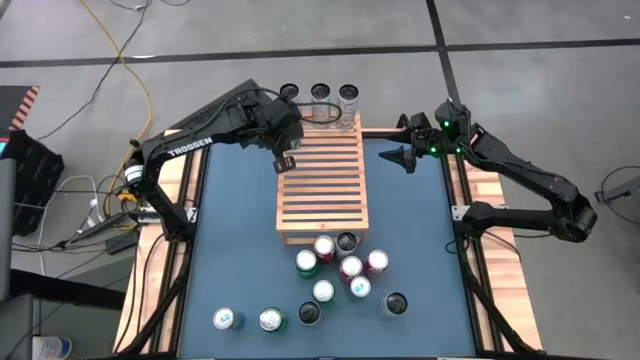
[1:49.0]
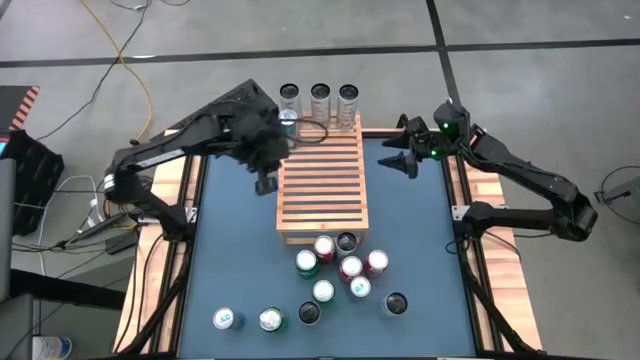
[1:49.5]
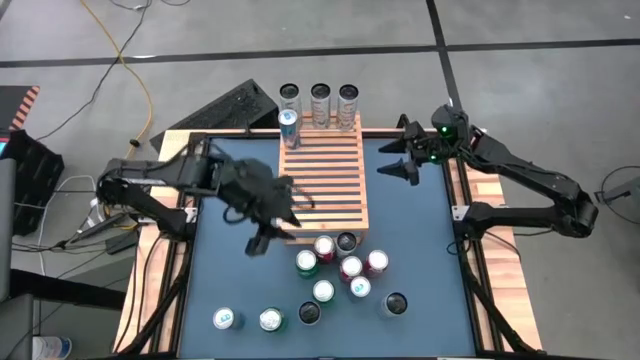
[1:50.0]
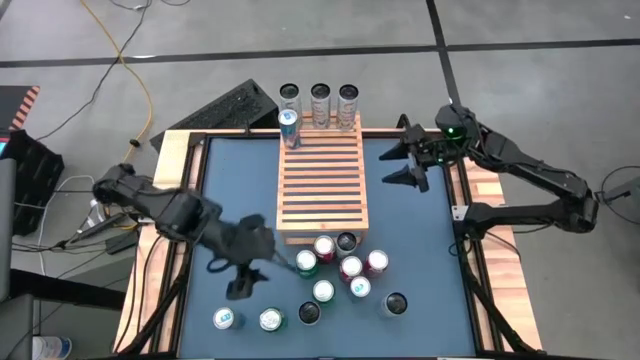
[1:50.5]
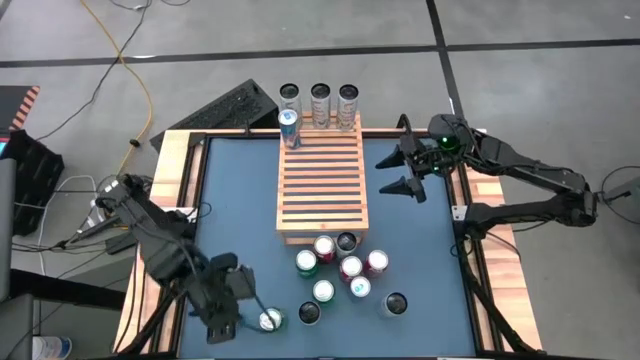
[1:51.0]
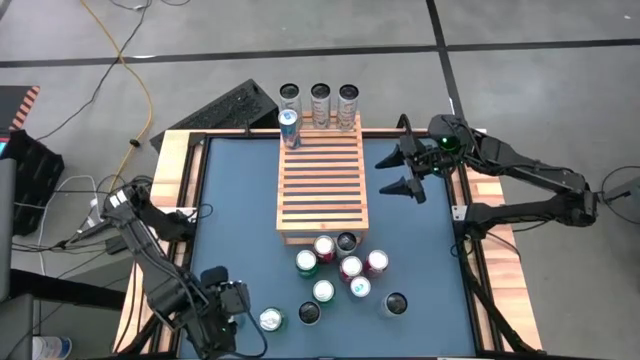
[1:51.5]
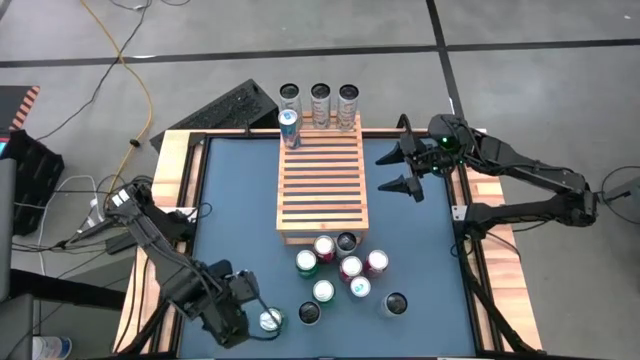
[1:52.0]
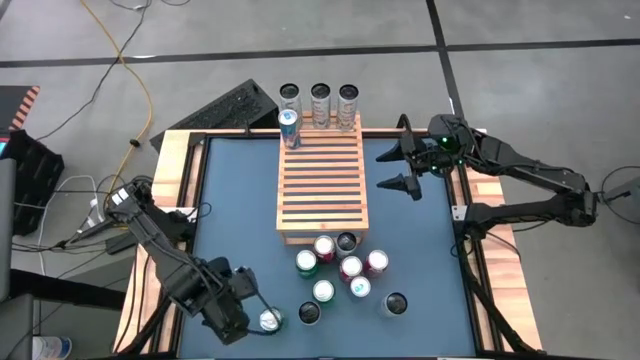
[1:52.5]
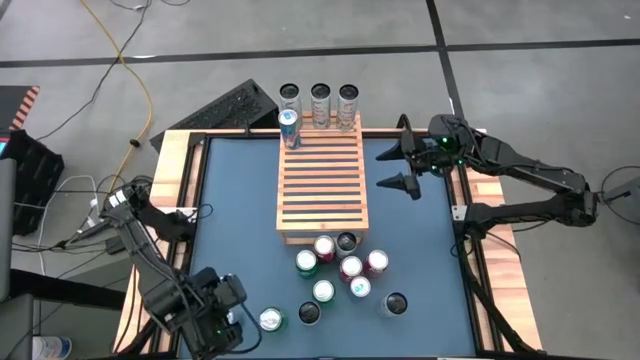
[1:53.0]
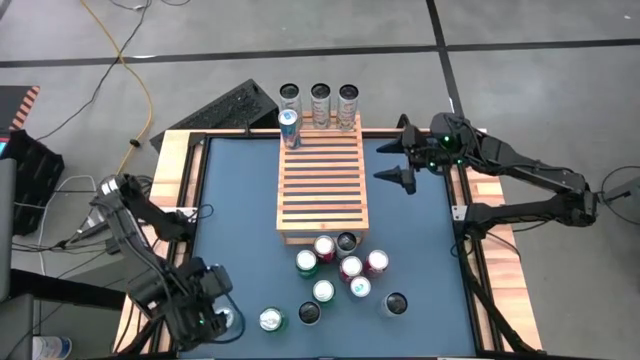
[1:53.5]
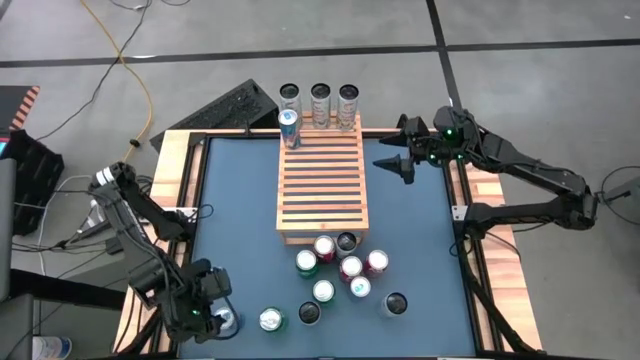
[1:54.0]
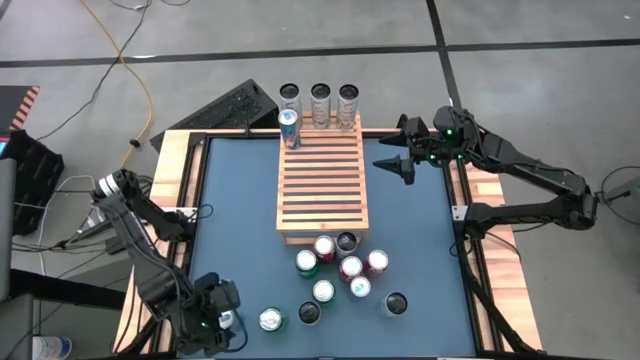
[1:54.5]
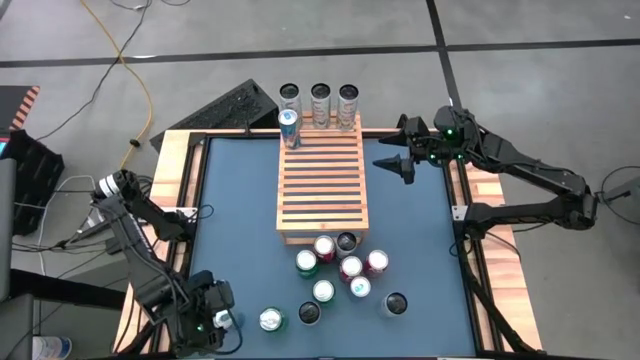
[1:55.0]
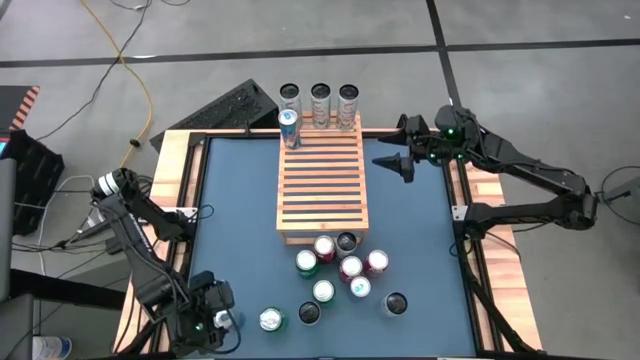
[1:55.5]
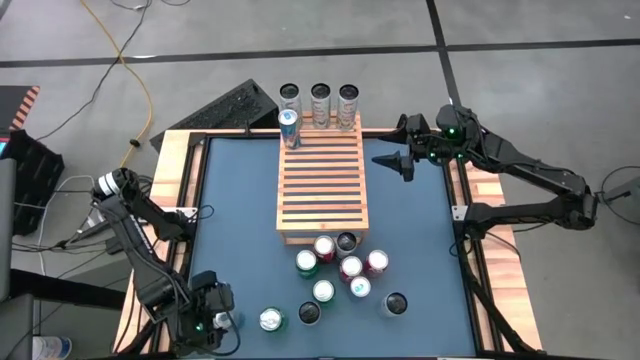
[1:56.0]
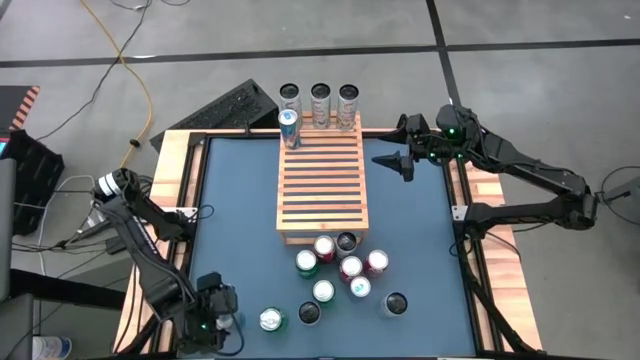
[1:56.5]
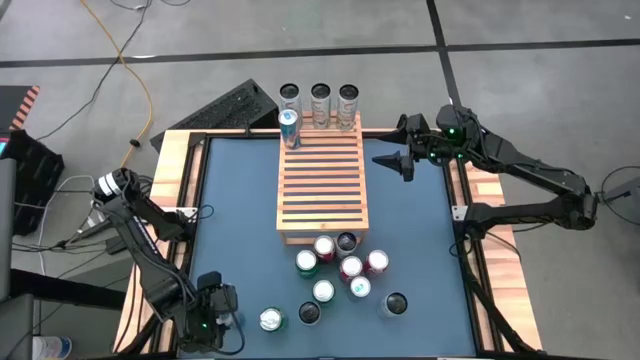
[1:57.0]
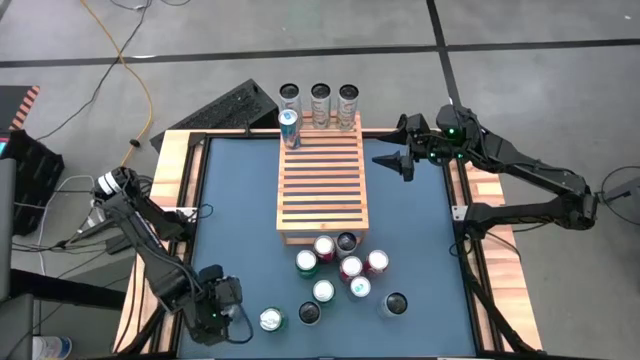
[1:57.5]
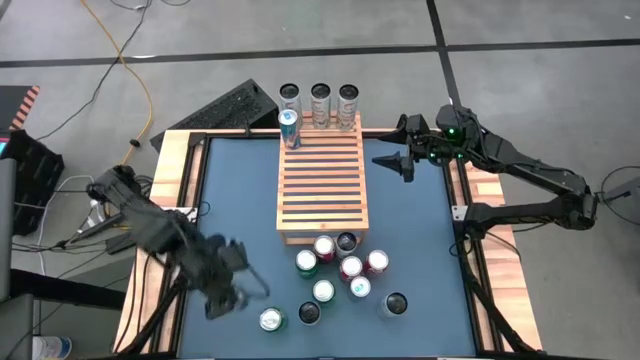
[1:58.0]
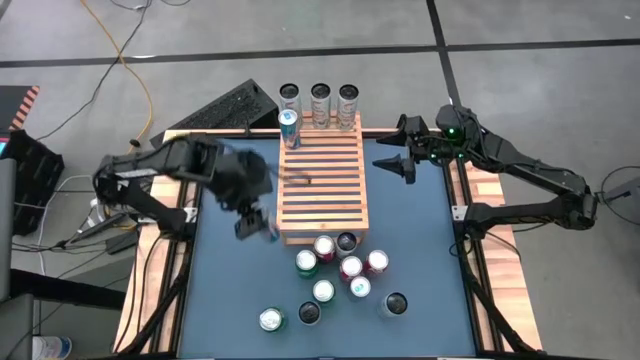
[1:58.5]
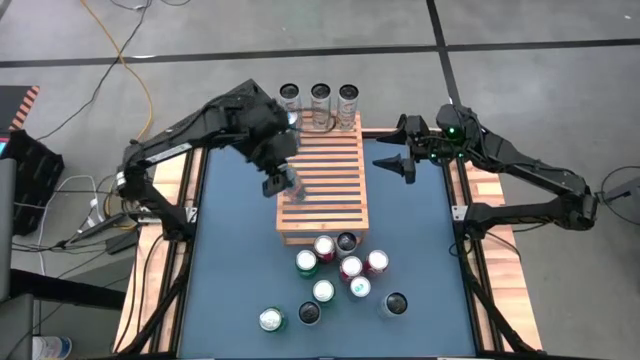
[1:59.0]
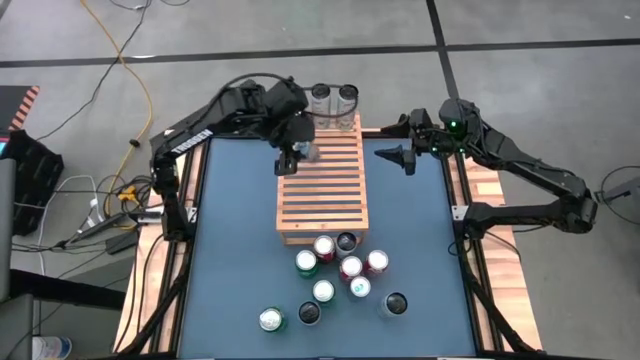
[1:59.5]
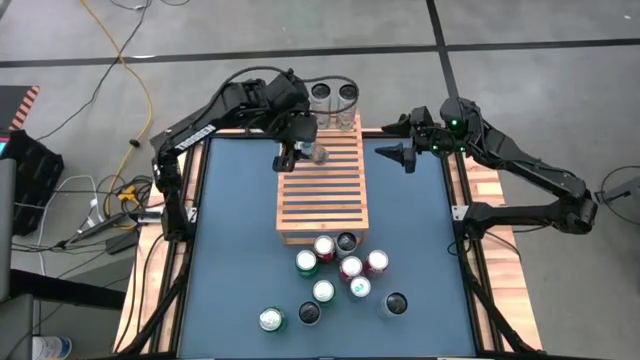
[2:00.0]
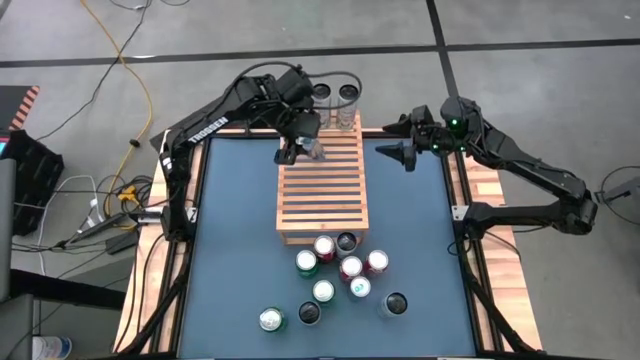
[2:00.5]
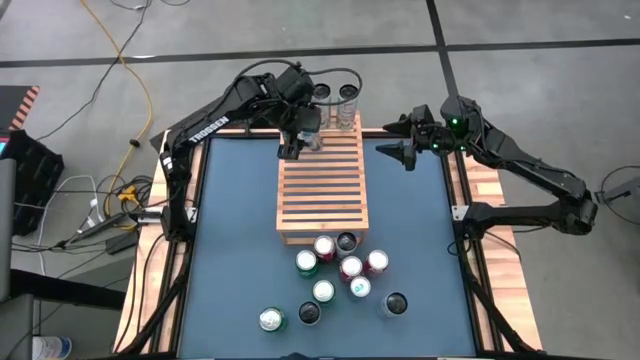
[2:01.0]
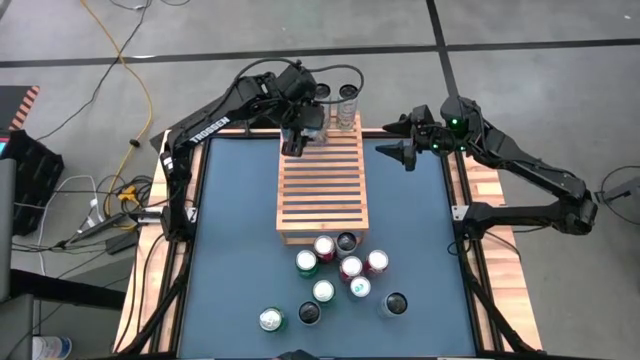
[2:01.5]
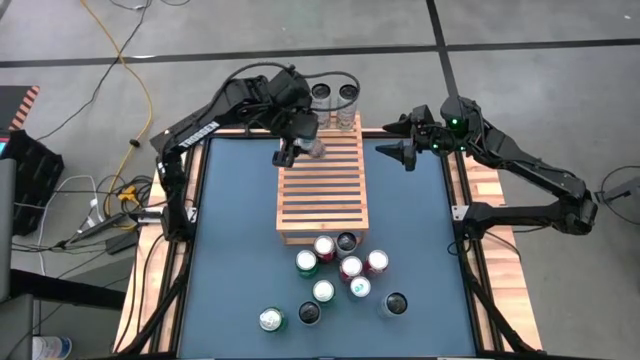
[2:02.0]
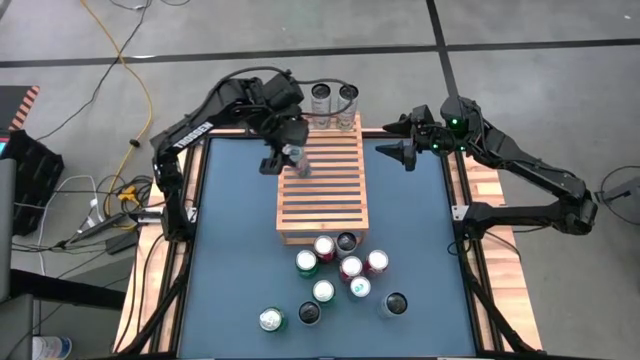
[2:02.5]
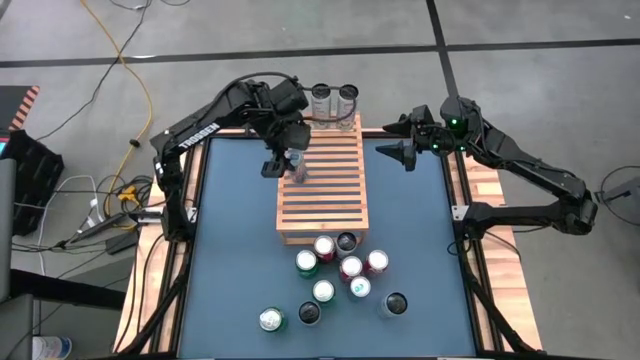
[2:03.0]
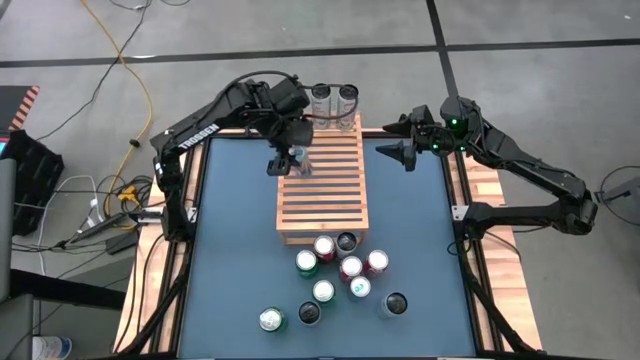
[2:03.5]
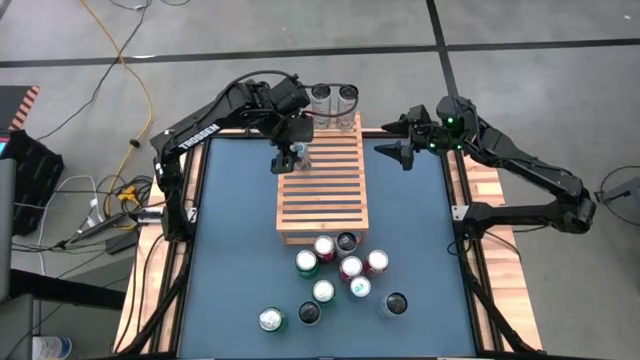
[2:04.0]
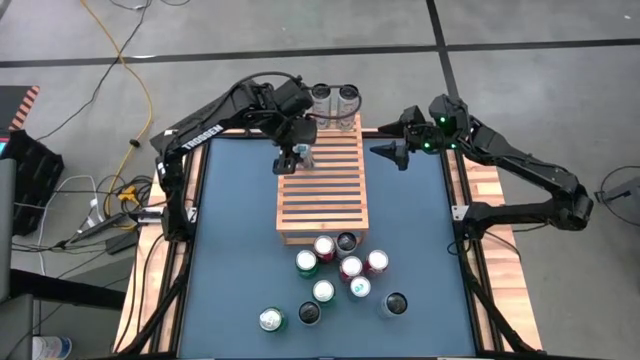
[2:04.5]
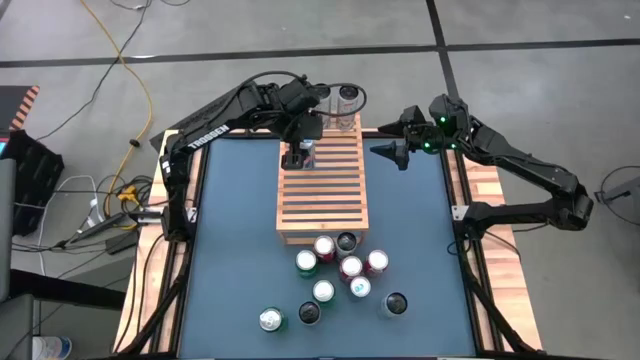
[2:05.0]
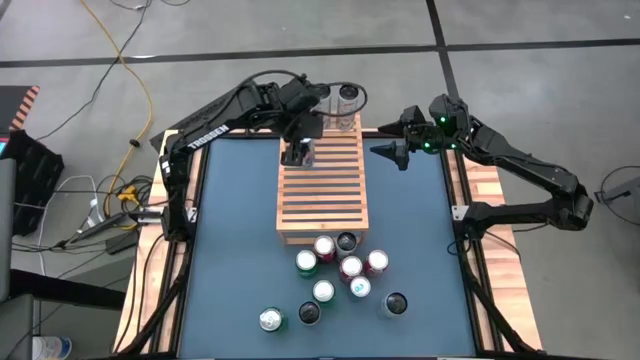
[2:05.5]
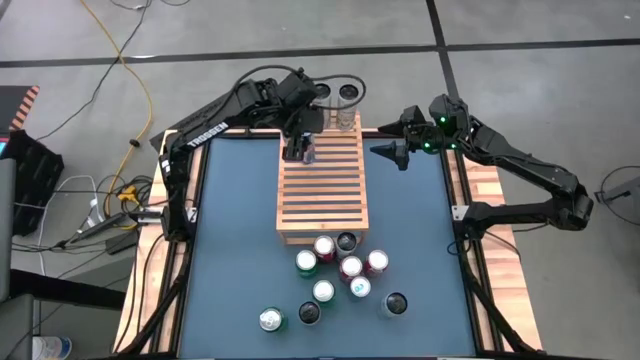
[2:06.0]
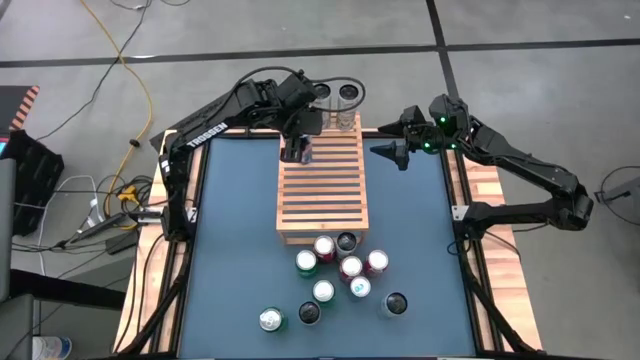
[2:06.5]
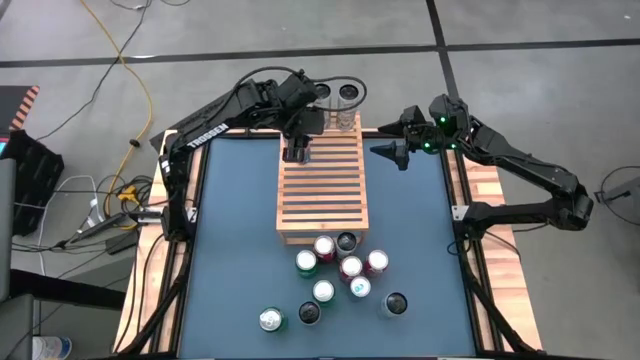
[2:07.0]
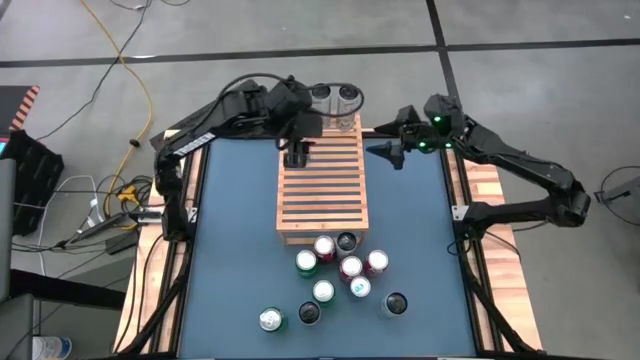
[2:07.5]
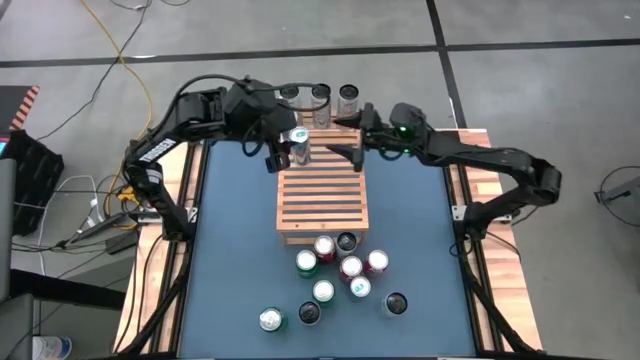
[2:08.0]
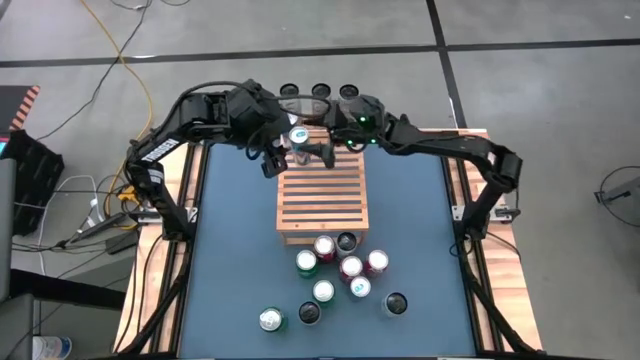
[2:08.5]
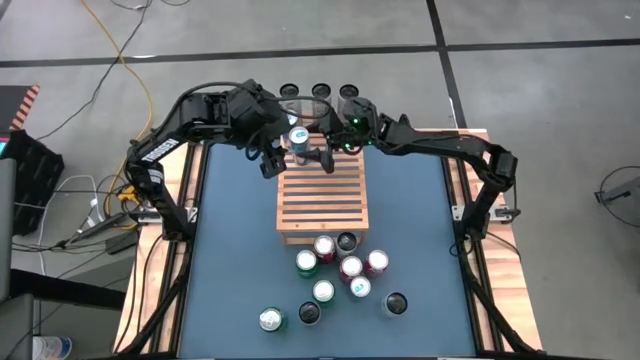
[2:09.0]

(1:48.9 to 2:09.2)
Task: Place canned beverage on shelf
Put the left blue soda can on the shelf aligned with the other blue soda cans
